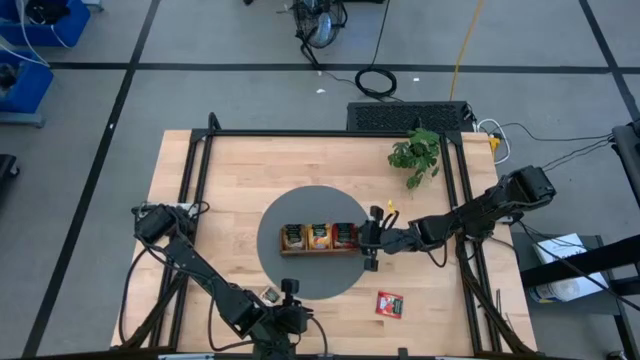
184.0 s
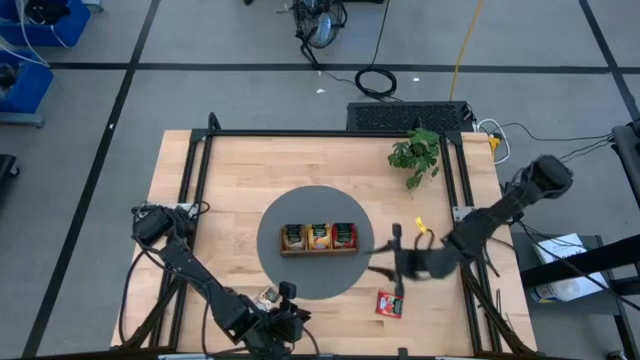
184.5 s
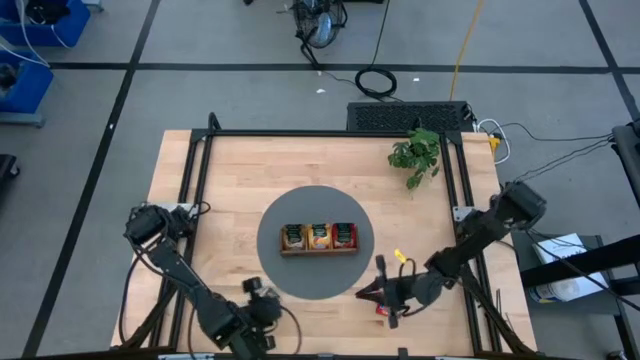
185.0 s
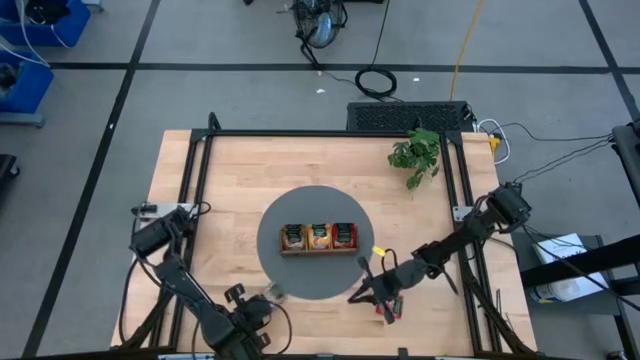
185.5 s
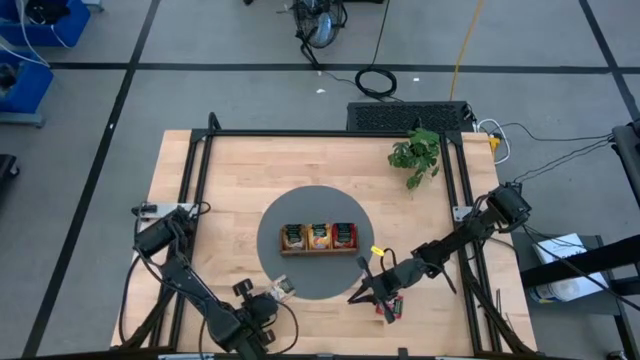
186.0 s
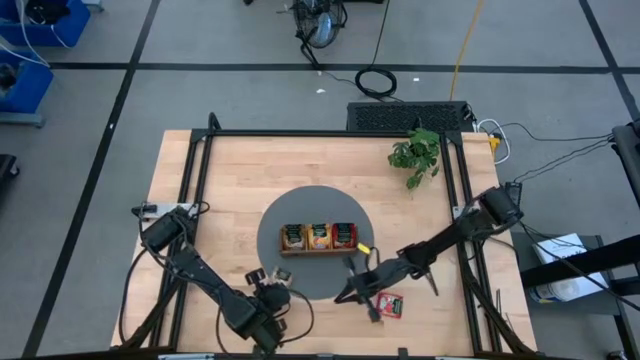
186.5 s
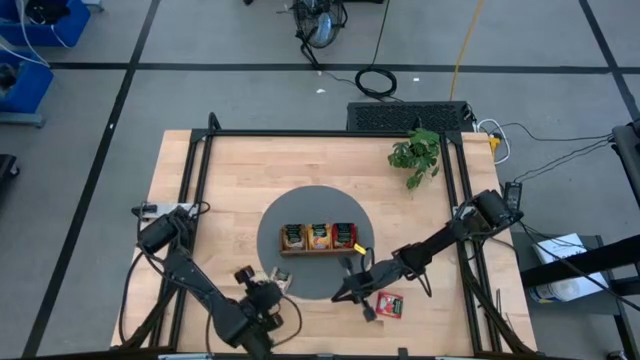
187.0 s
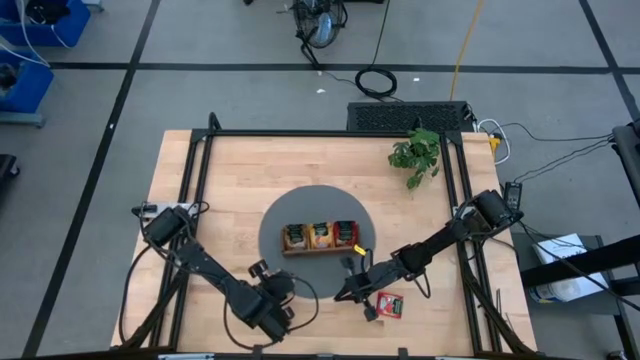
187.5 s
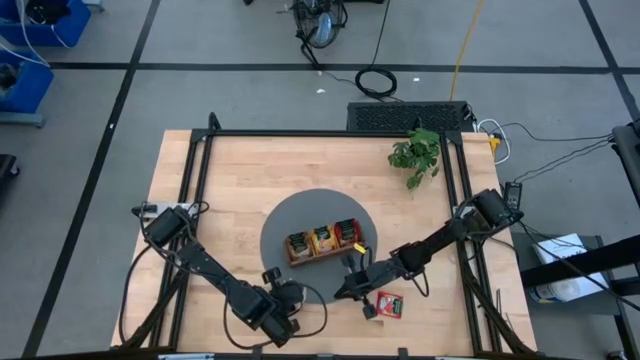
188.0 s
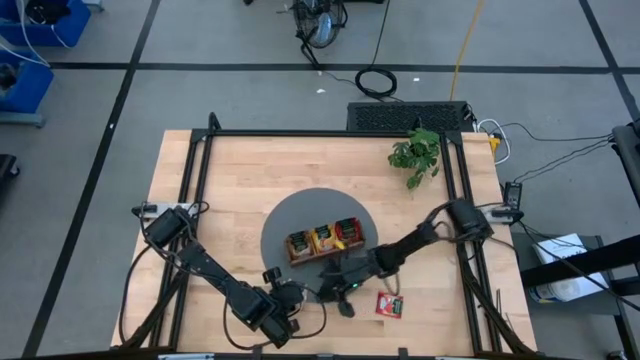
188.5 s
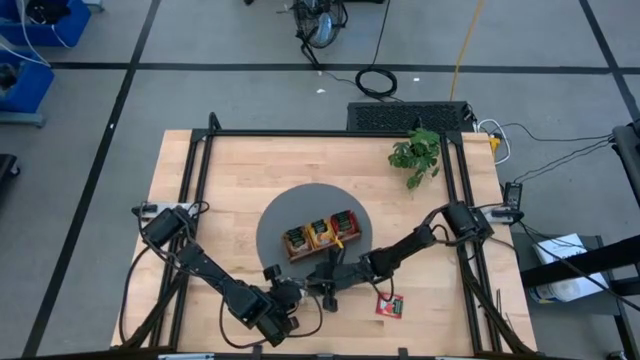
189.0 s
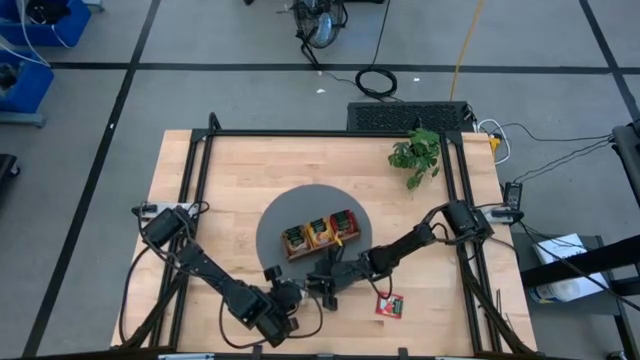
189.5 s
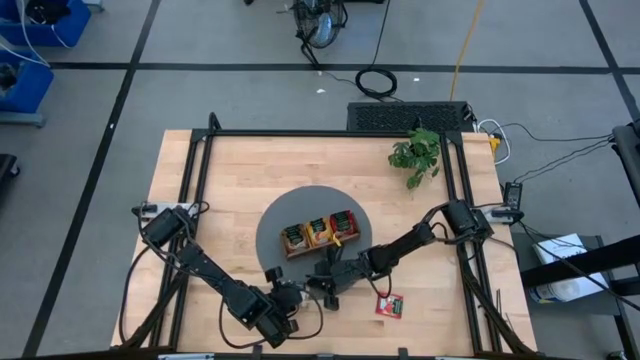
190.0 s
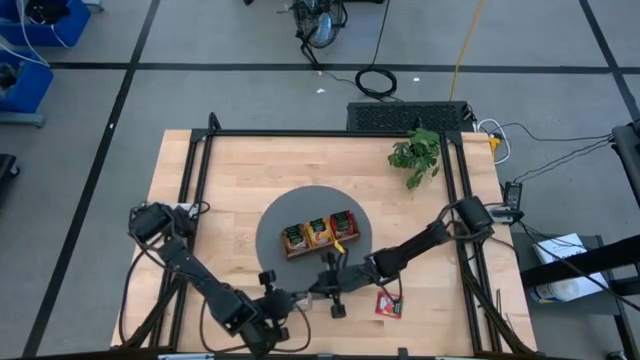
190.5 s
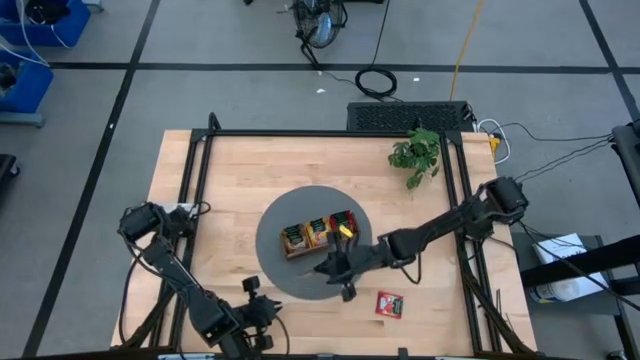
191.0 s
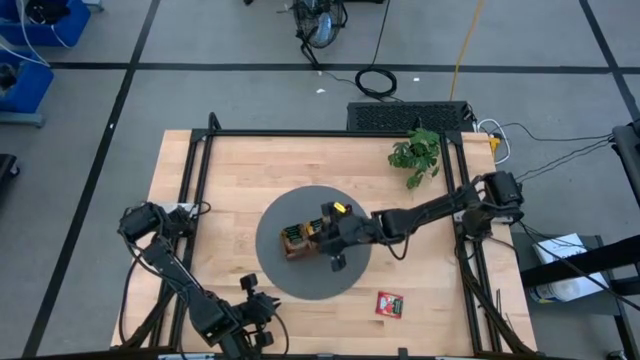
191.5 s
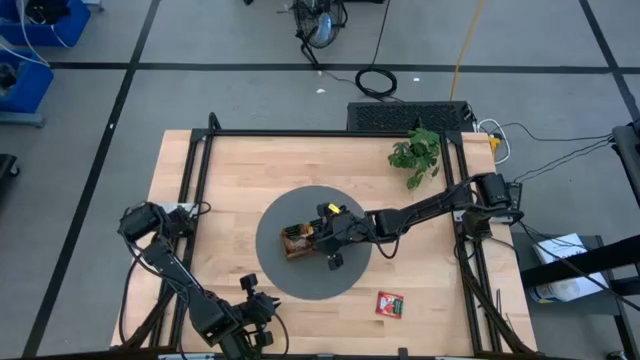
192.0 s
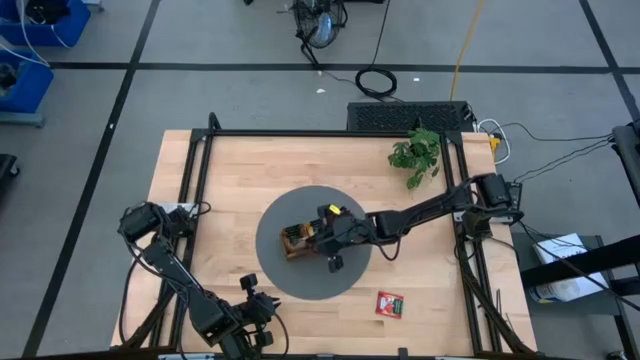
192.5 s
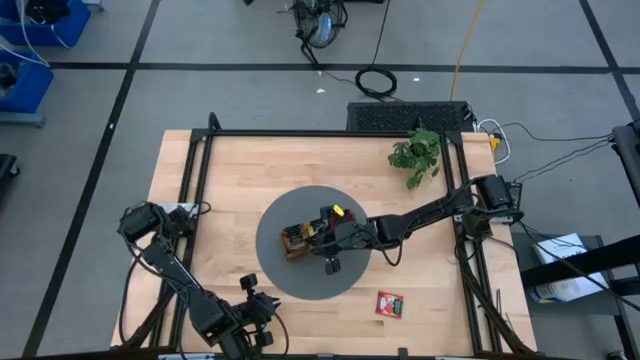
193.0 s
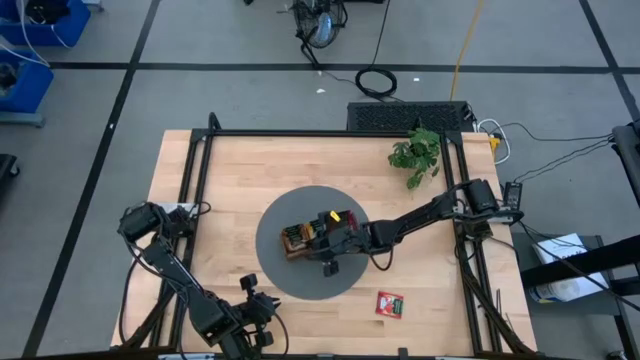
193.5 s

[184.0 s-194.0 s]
Task: Pick & Place Tea
Put the brown tea bag into the left section of the wooden organizer

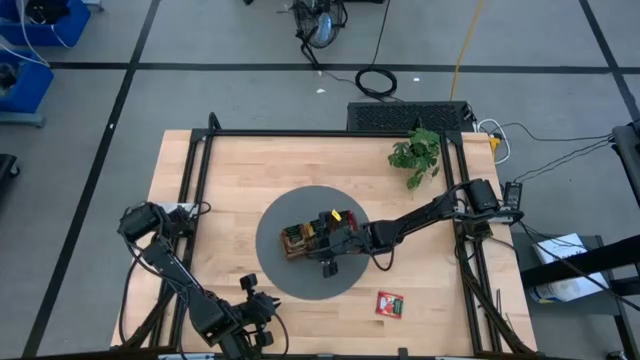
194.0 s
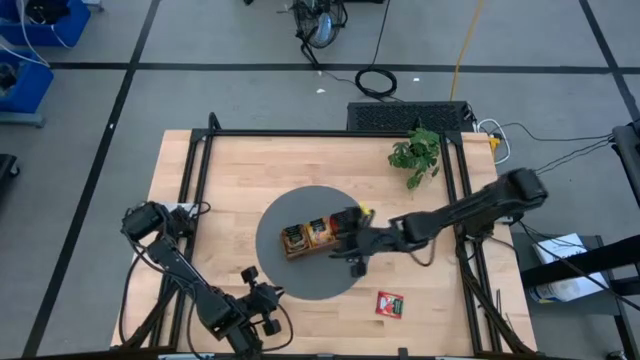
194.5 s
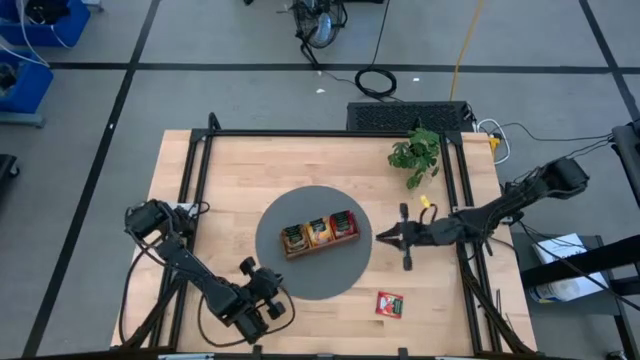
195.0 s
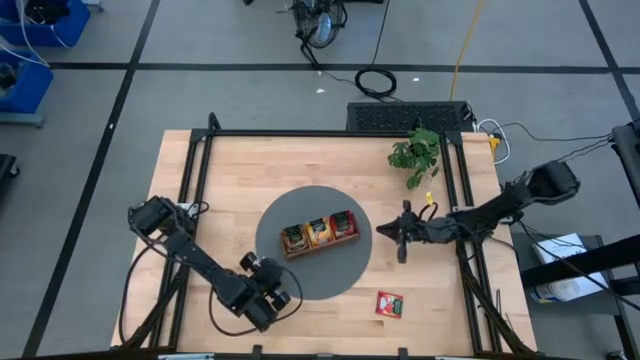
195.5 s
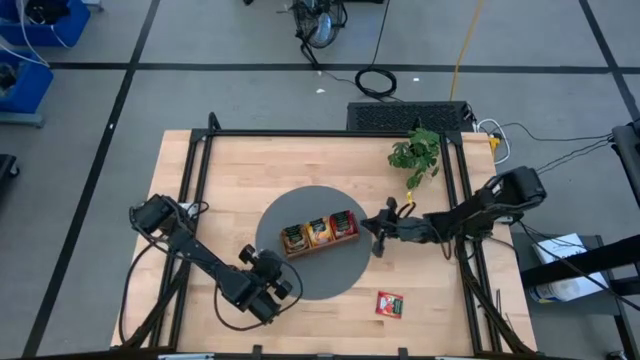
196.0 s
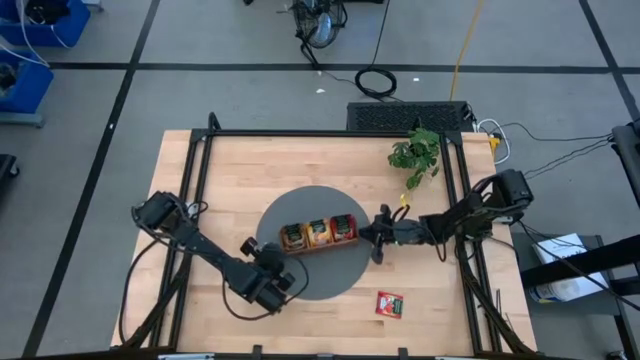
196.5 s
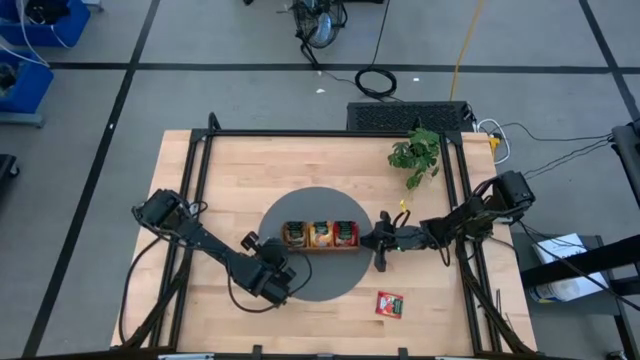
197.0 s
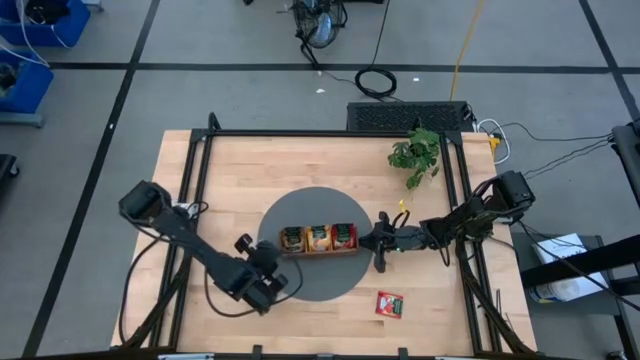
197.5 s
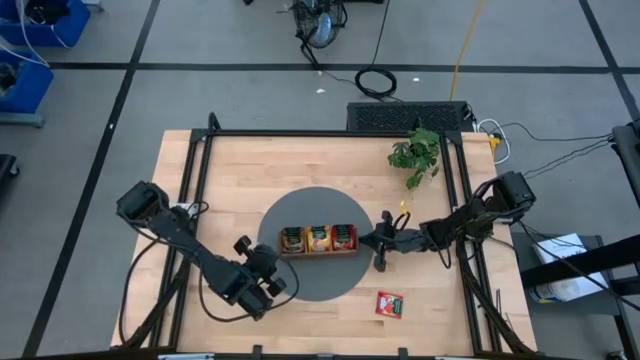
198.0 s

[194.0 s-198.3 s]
Adjust the wooden organizer

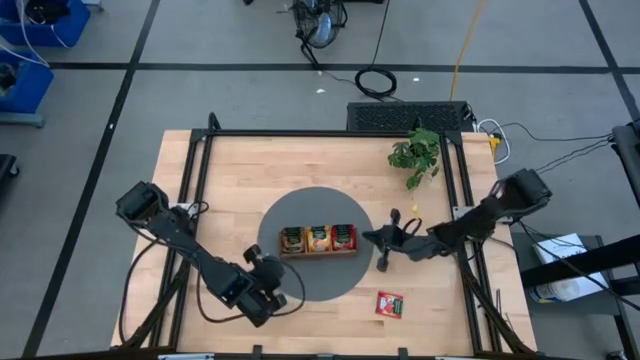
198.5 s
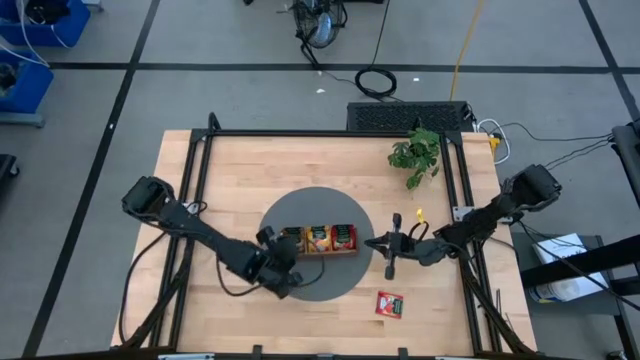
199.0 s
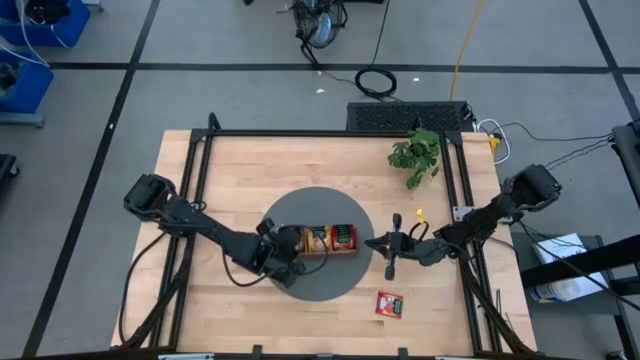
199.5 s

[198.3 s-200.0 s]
Adjust the brown tea bag in the left section of the wooden organizer

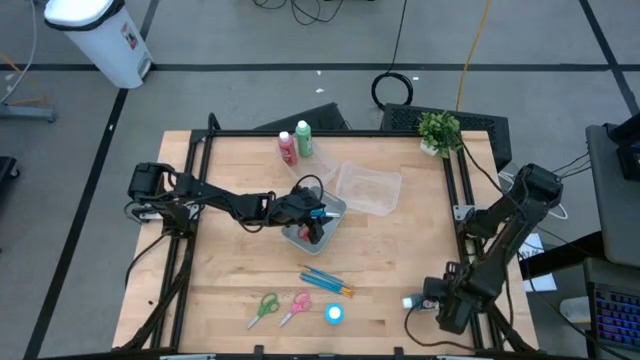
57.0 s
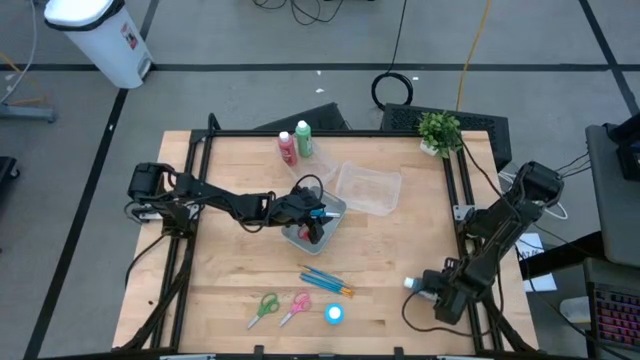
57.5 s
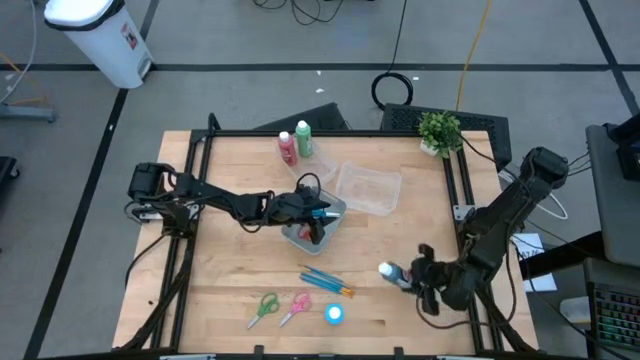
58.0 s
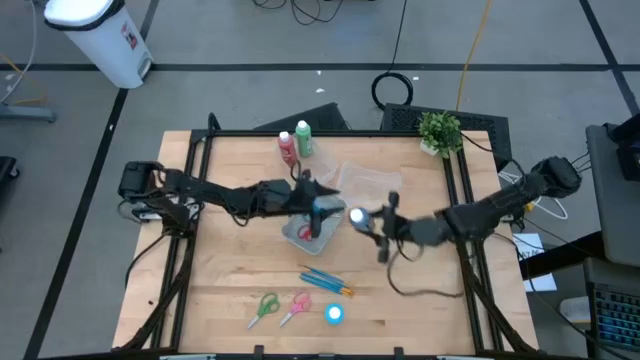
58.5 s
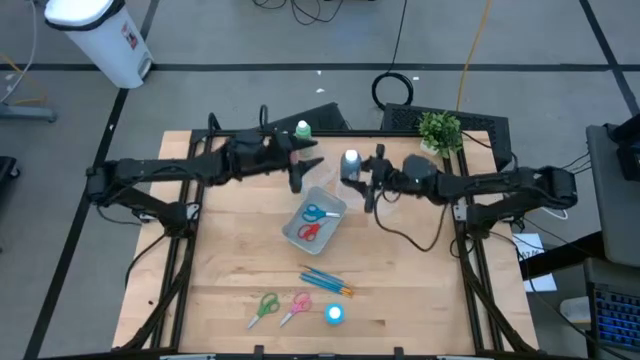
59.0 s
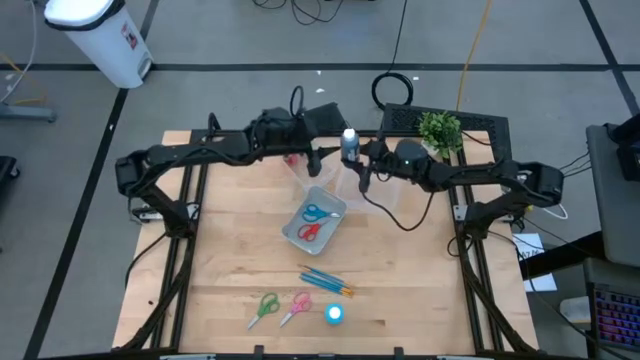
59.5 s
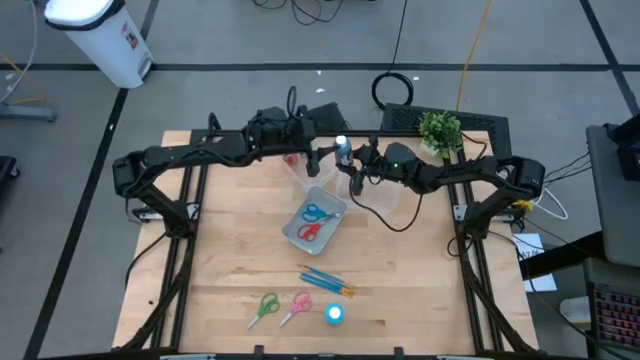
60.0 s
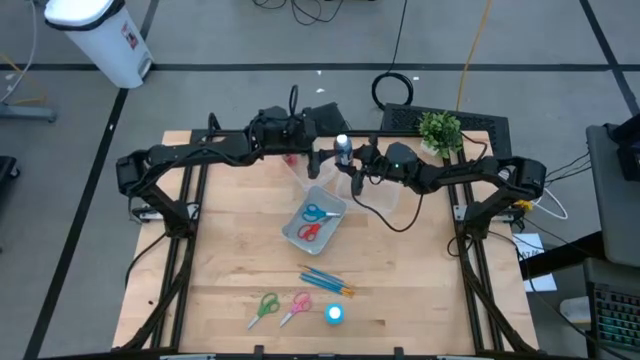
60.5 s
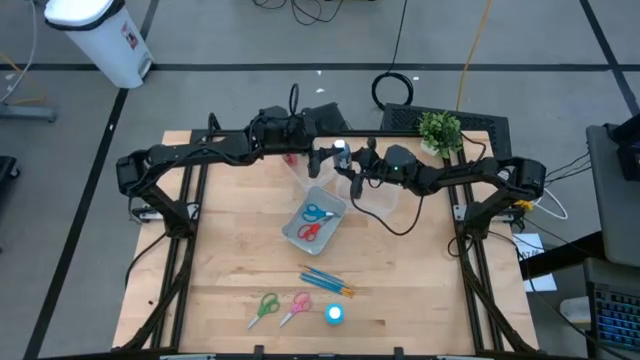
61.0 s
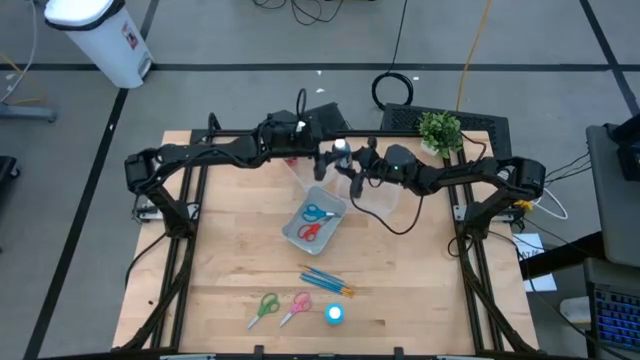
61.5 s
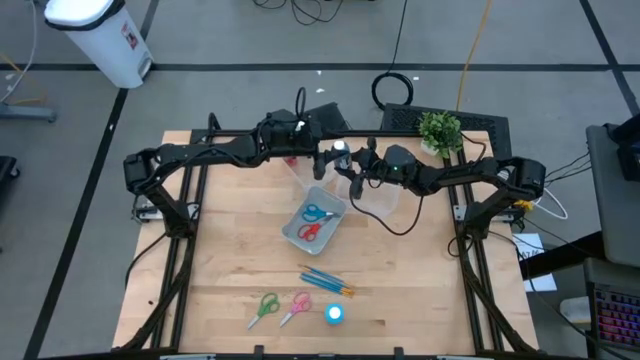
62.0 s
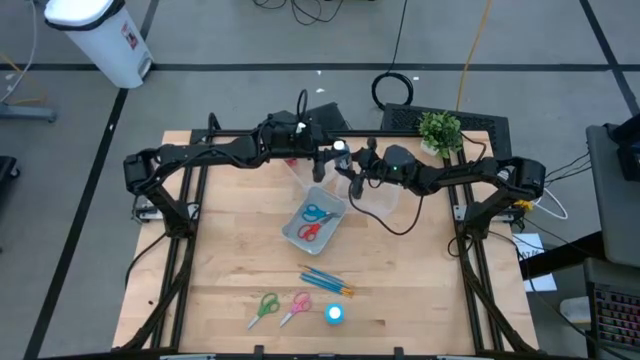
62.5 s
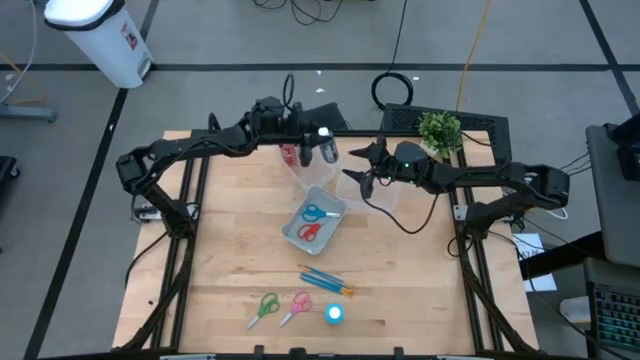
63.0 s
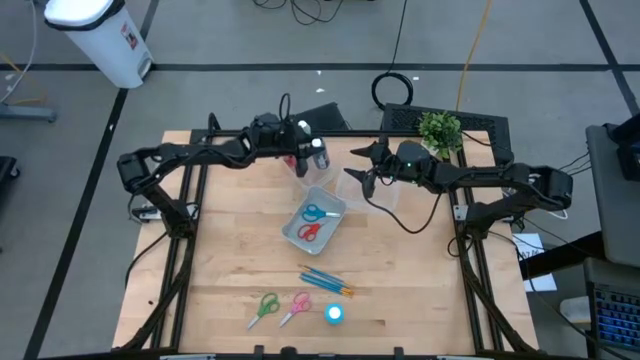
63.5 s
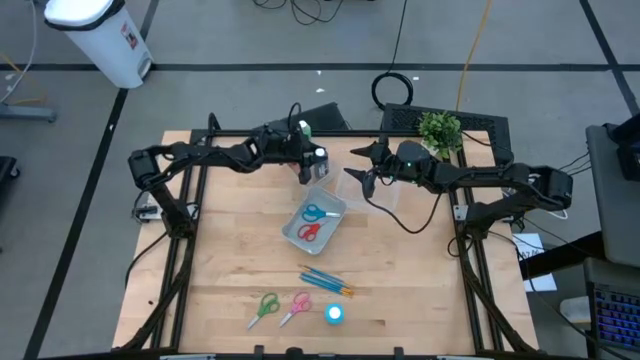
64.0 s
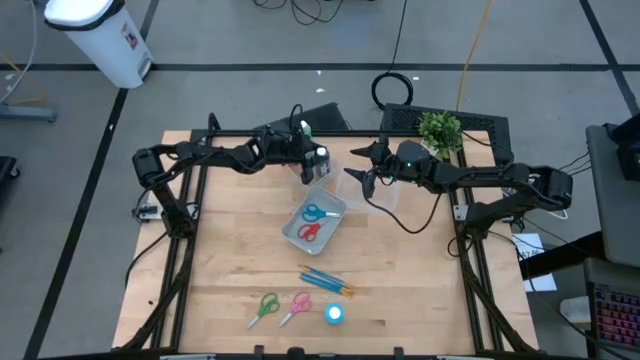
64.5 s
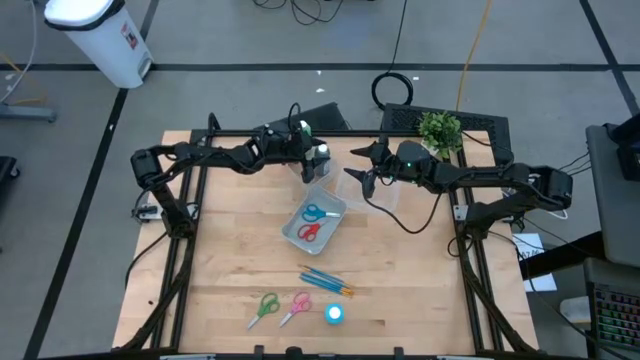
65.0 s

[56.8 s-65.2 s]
Task: Pick & Place Paint Supplies
Put the black paint bottle into the left transparent bin
